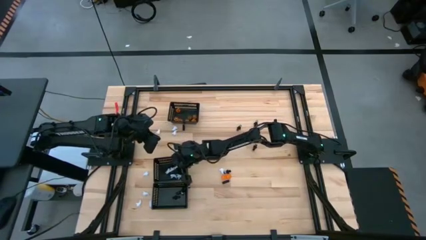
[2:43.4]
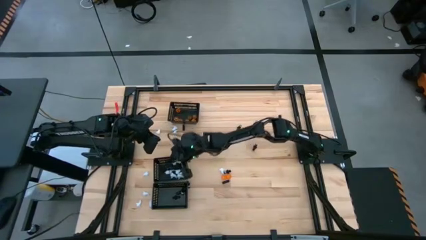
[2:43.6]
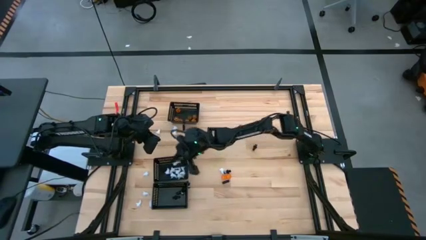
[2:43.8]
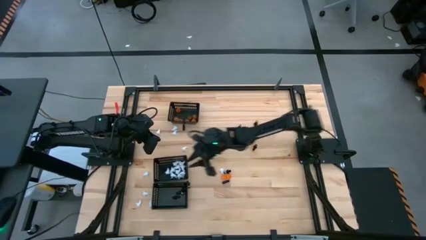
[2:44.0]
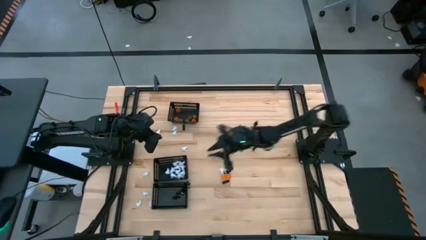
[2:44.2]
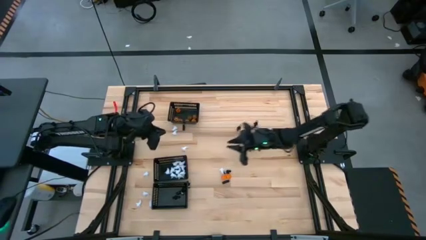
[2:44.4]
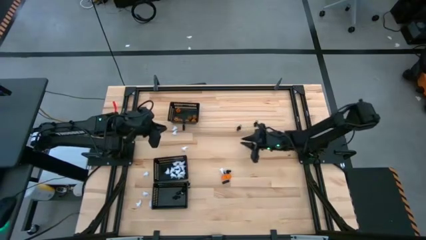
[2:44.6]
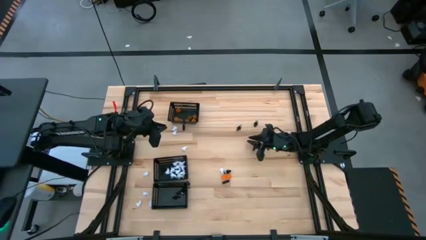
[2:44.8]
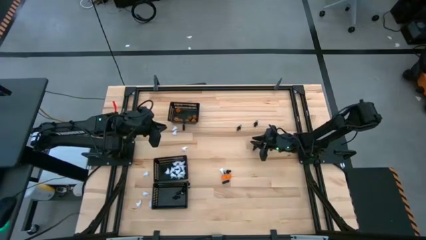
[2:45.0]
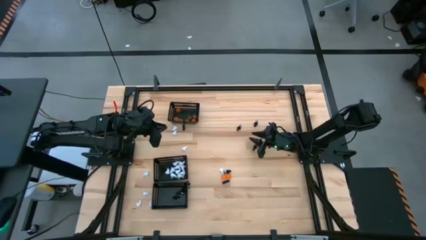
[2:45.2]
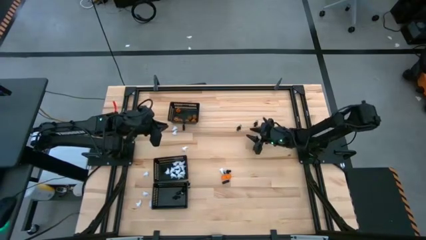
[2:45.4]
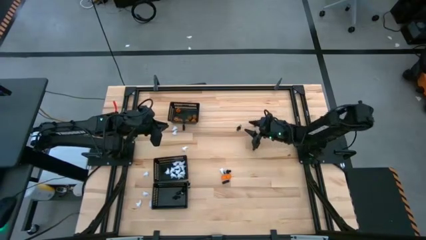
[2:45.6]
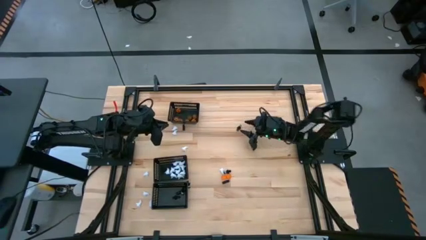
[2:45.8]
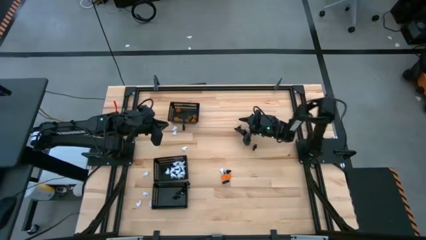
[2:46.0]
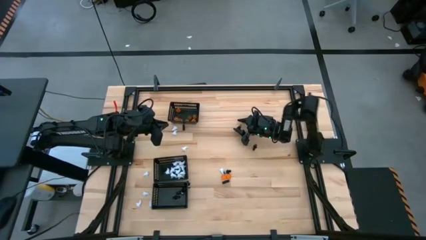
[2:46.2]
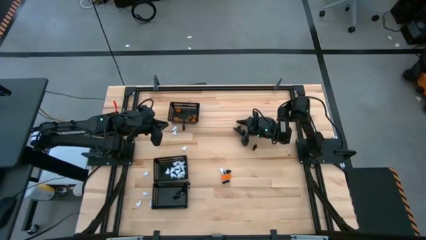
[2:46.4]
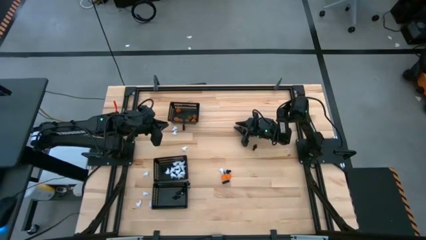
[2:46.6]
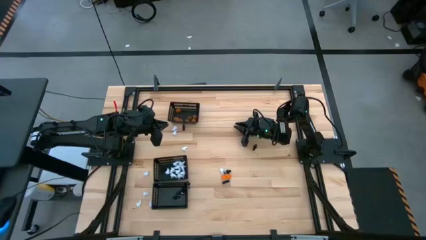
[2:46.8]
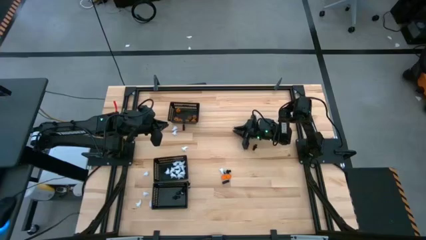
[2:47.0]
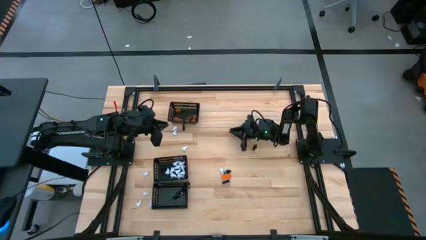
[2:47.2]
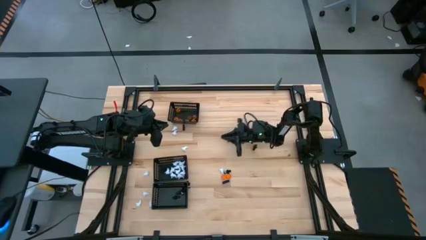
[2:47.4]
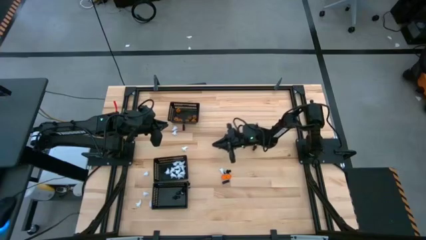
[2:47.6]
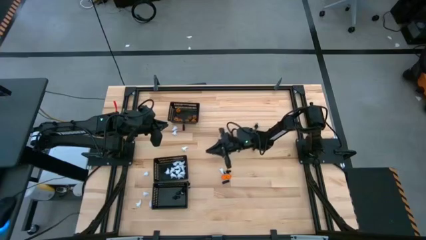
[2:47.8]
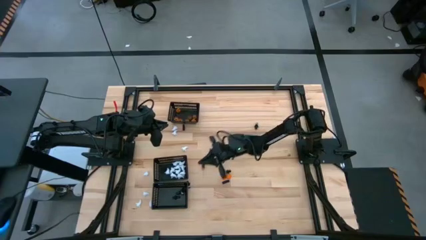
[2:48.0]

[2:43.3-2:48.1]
Task: Sort Halloween decoration
Put the black skeleton toy into the bottom black bin

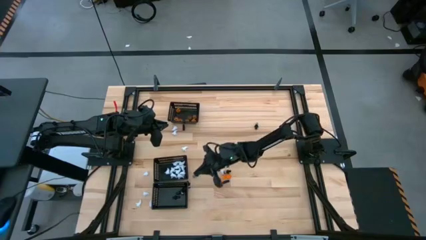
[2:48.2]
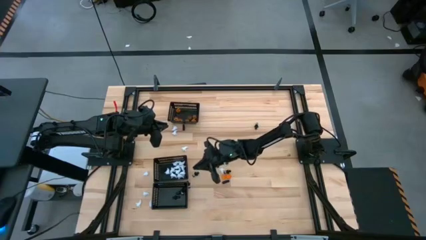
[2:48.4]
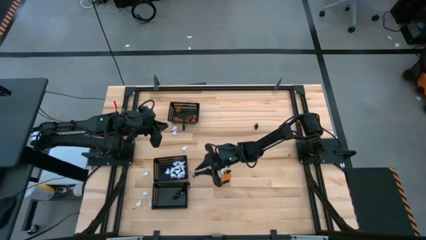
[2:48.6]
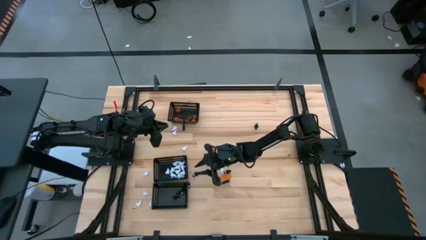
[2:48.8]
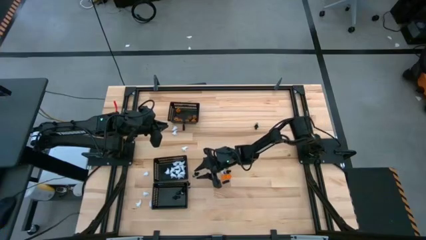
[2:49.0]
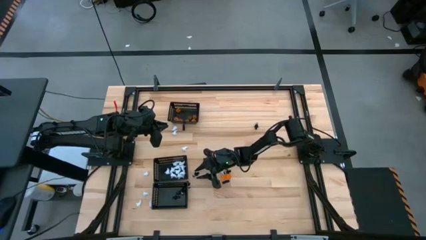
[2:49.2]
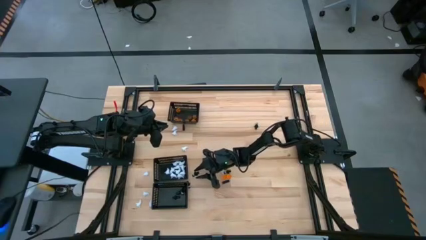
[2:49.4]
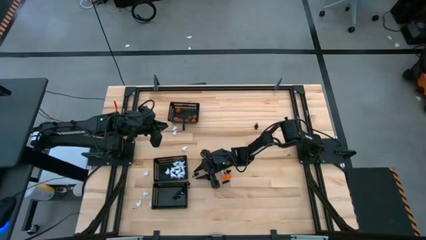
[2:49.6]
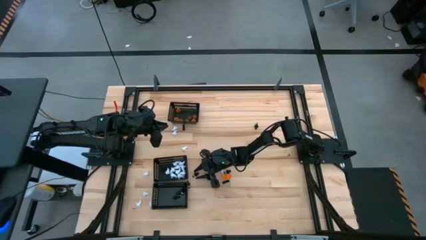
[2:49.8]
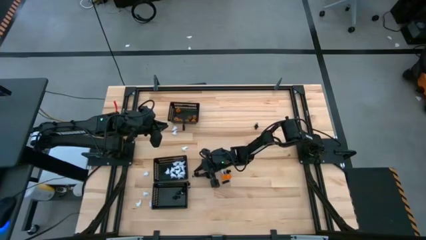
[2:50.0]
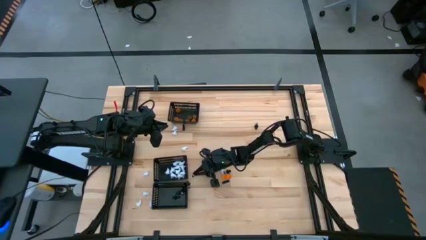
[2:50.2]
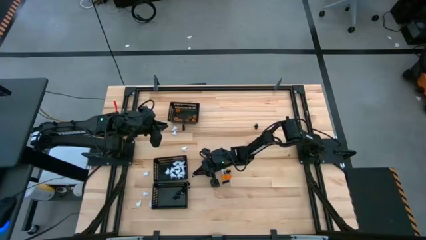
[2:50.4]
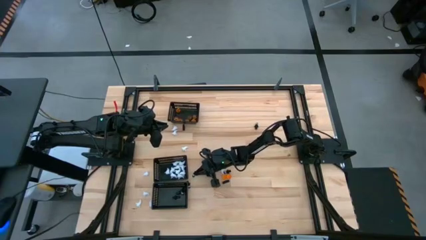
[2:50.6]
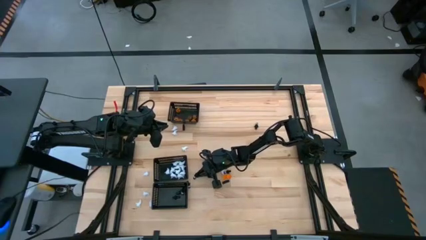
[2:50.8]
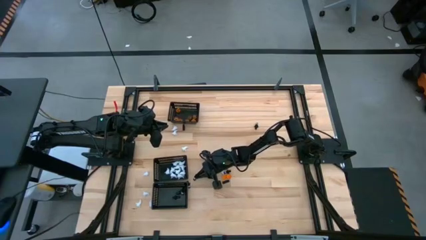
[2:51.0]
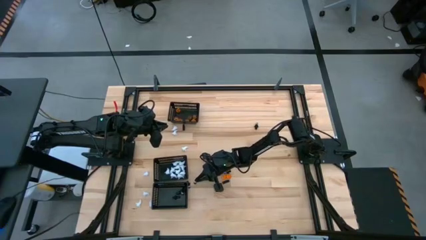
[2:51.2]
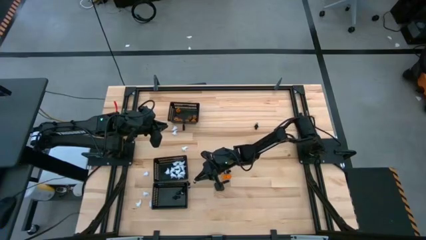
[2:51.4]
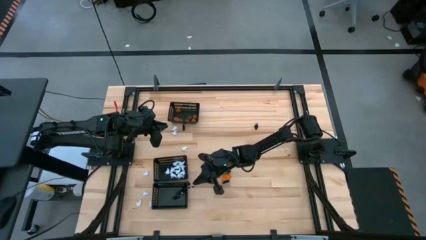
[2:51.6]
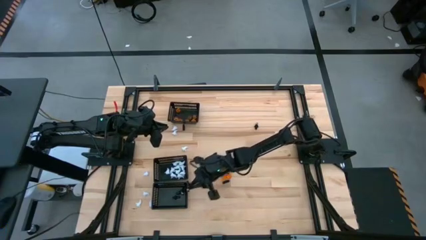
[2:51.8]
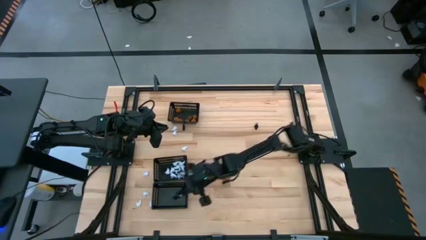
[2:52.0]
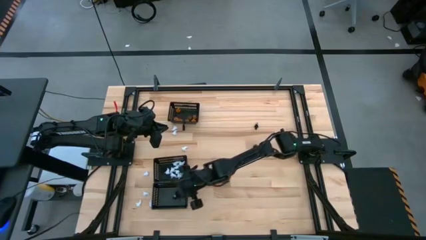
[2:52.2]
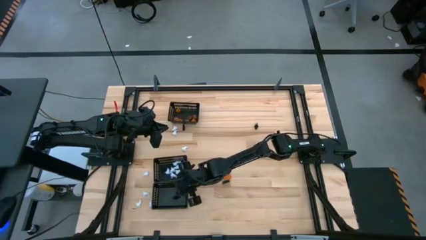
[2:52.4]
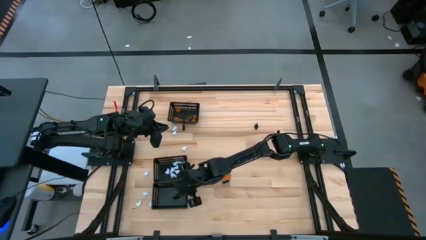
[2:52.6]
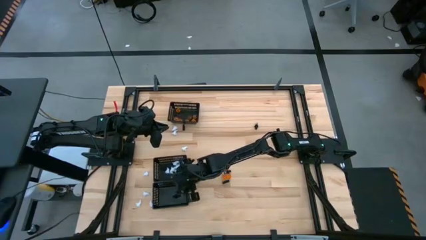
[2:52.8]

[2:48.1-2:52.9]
Put the black skeleton toy into the bottom black bin

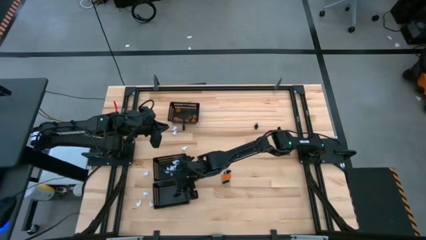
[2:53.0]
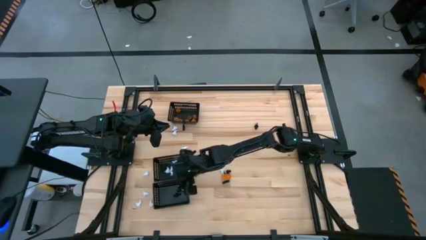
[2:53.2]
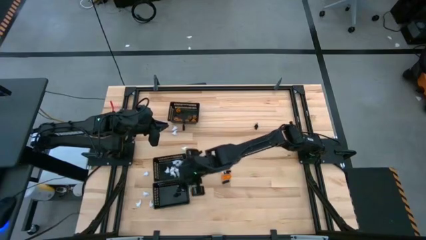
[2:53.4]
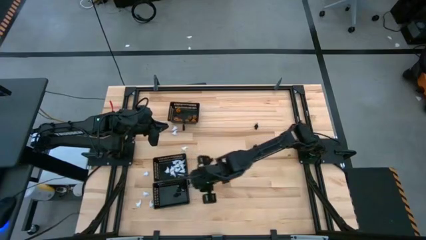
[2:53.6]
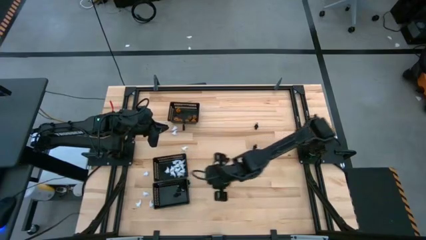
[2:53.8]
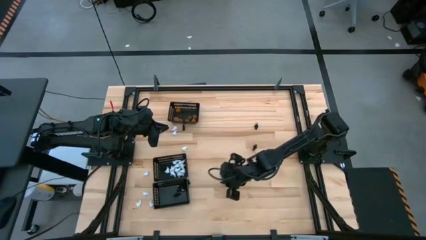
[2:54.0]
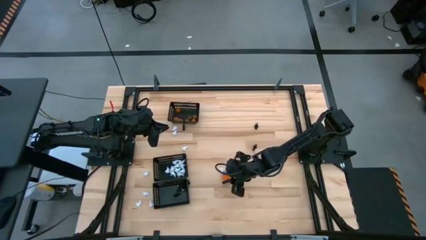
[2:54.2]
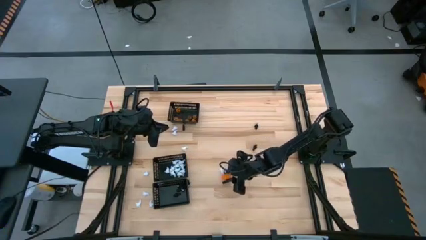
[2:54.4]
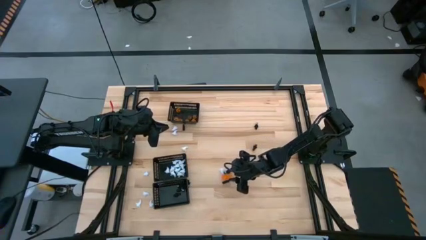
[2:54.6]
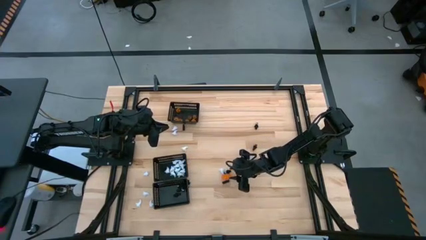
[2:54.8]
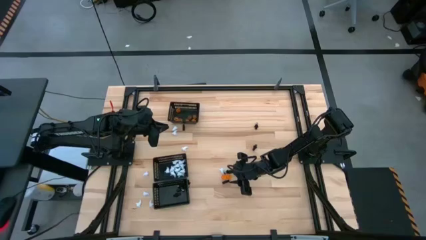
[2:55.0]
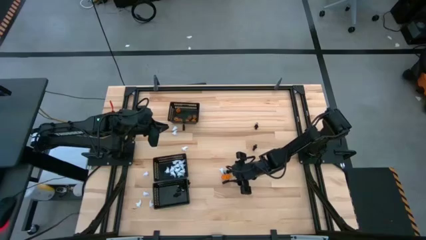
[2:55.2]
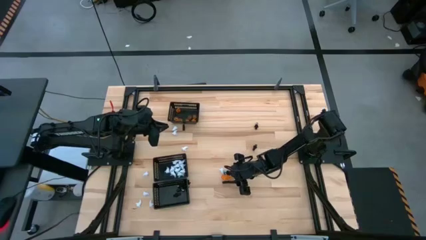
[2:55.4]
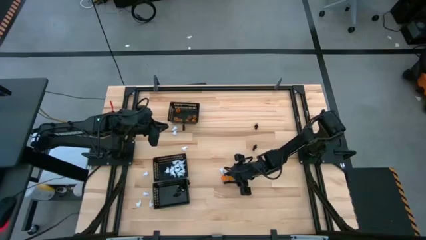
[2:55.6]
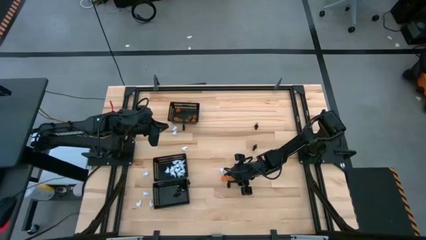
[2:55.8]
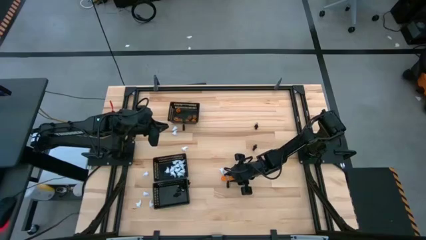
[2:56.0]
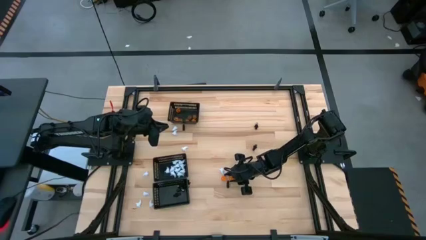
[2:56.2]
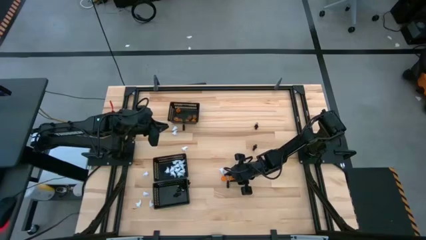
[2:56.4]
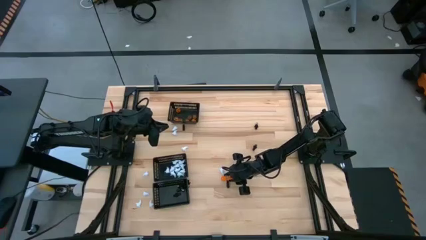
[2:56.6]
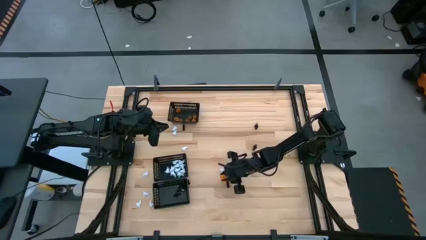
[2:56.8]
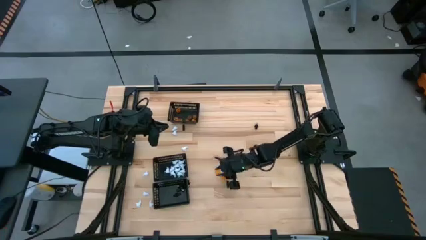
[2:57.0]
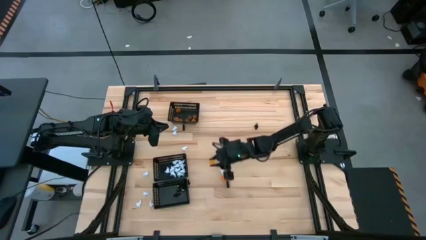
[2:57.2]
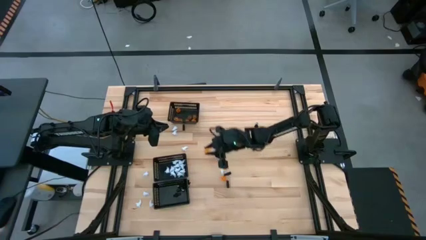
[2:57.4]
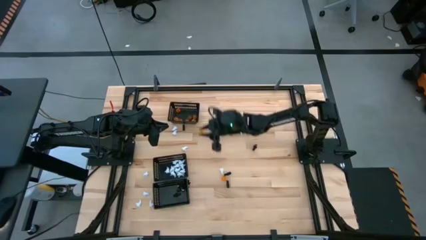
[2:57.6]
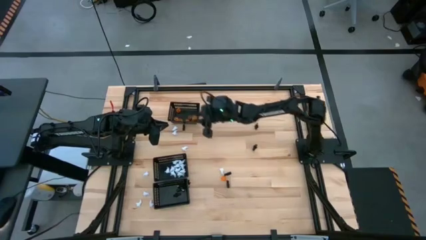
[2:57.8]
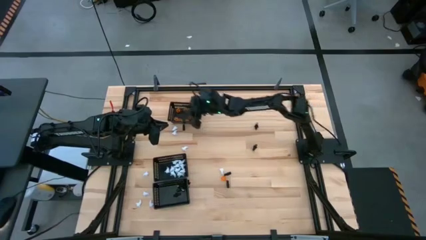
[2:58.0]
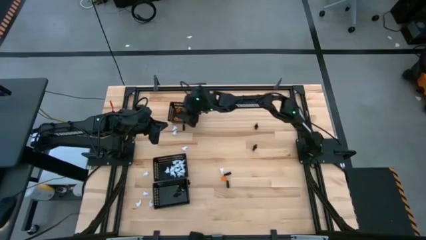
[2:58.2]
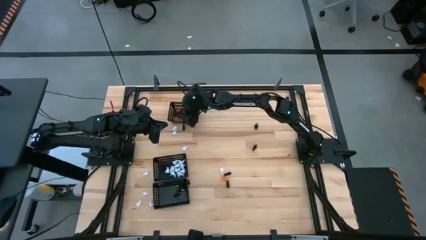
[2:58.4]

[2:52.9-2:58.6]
Put the orange pumpkin toy into the top black bin
